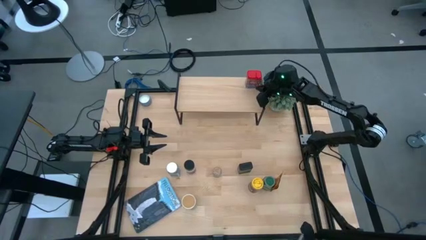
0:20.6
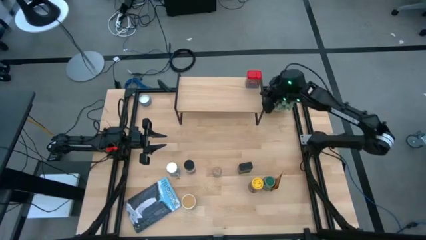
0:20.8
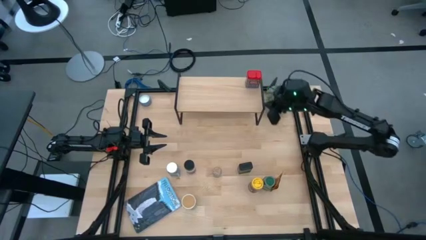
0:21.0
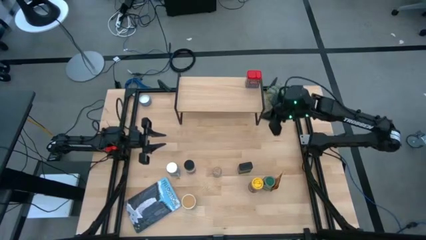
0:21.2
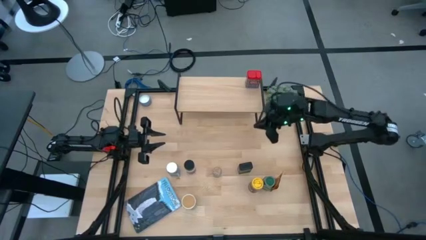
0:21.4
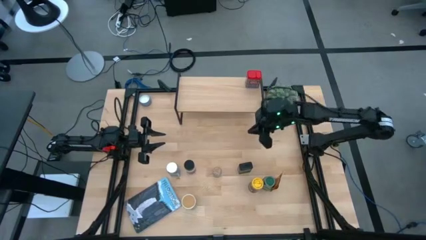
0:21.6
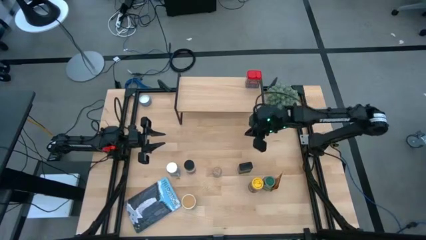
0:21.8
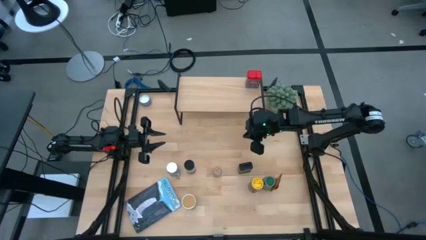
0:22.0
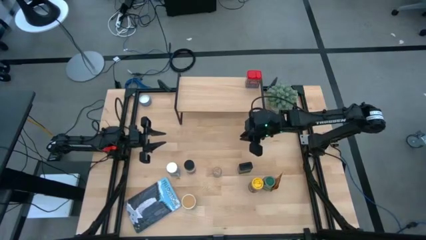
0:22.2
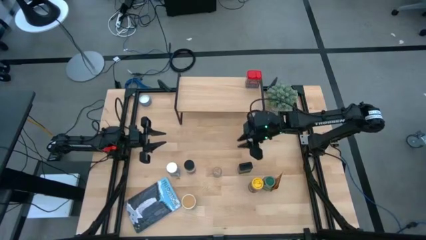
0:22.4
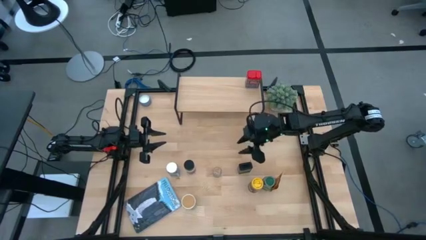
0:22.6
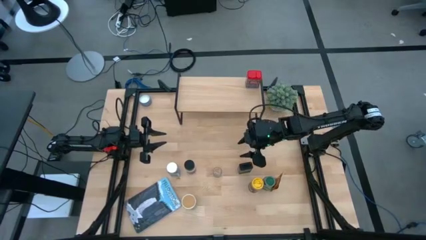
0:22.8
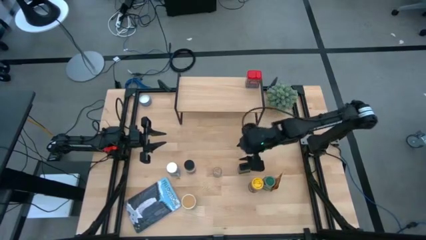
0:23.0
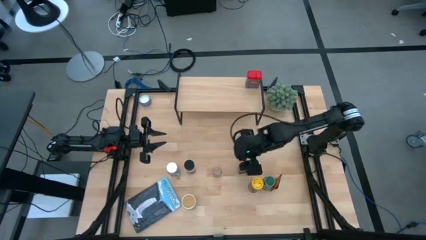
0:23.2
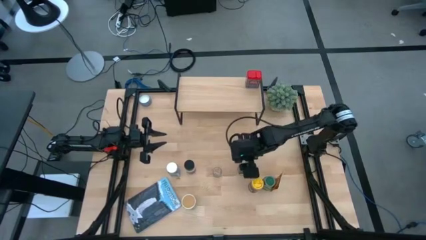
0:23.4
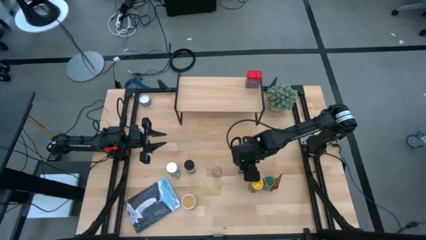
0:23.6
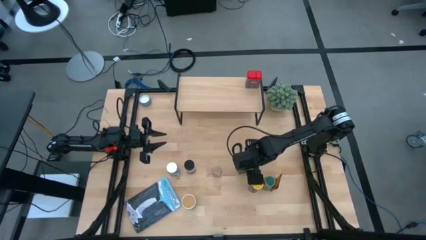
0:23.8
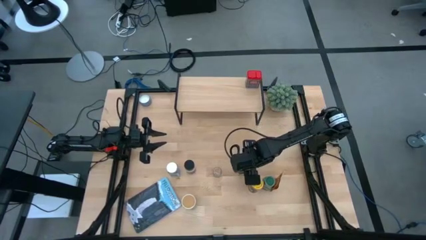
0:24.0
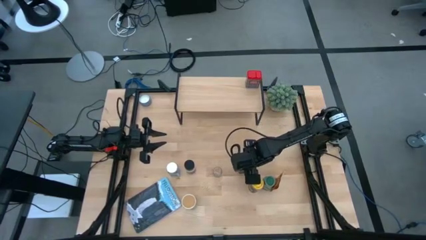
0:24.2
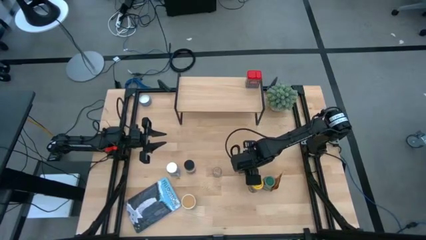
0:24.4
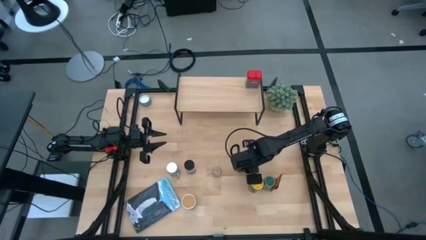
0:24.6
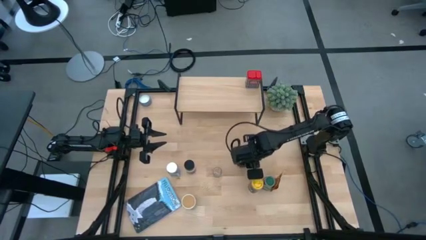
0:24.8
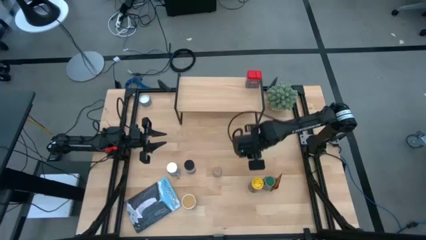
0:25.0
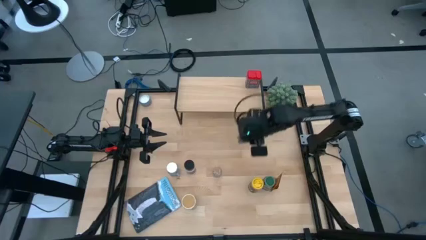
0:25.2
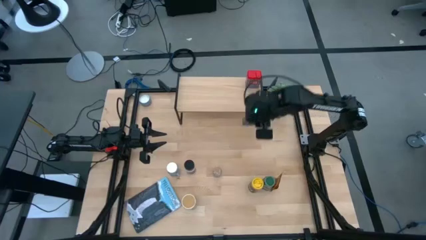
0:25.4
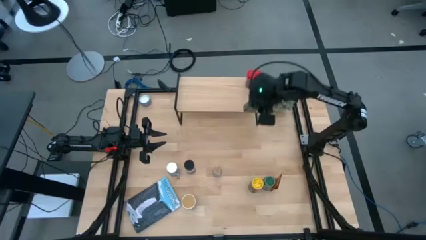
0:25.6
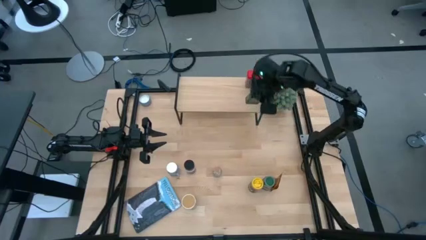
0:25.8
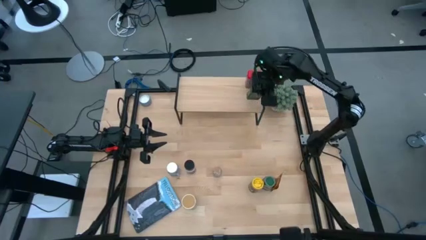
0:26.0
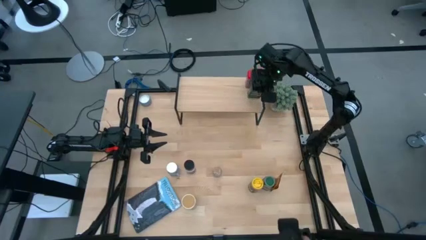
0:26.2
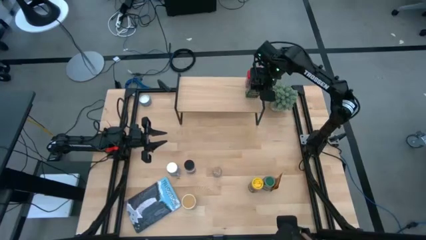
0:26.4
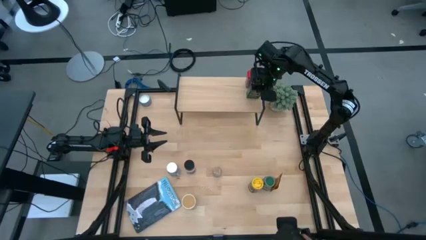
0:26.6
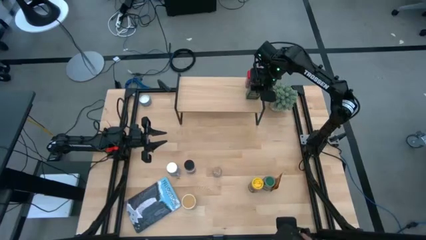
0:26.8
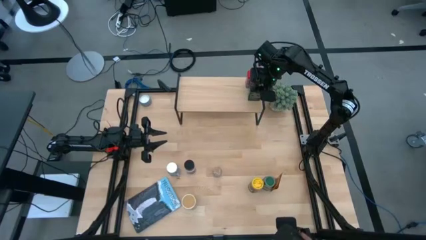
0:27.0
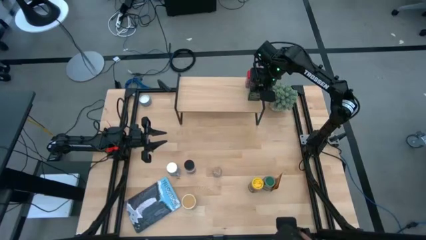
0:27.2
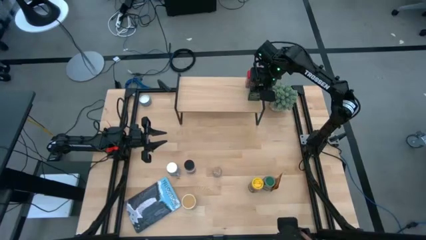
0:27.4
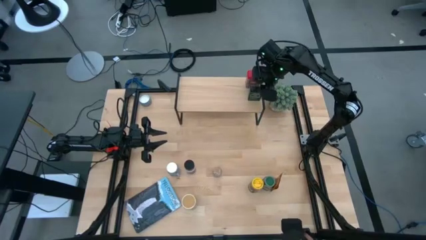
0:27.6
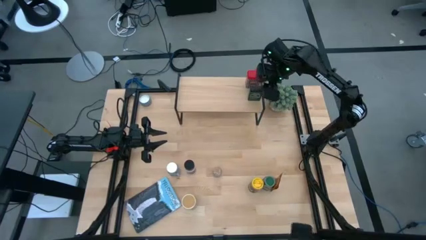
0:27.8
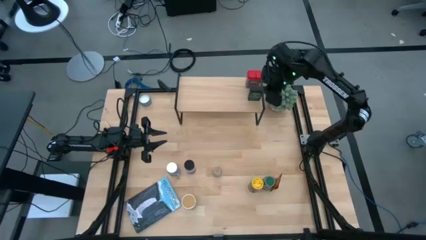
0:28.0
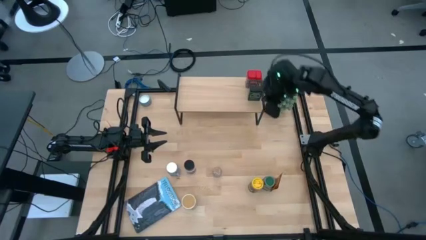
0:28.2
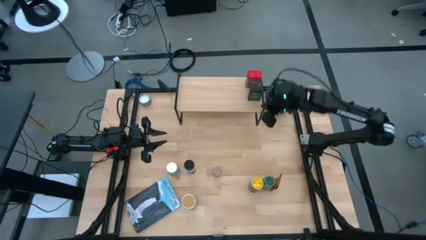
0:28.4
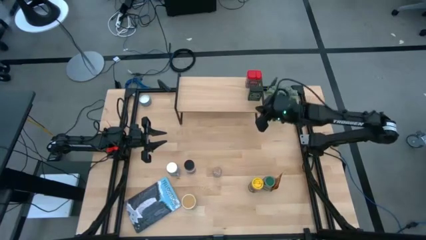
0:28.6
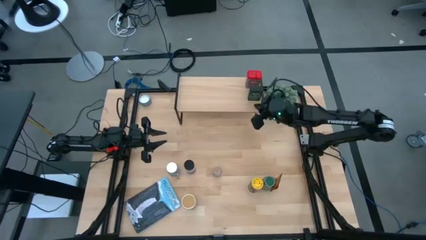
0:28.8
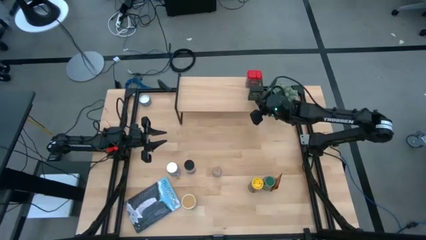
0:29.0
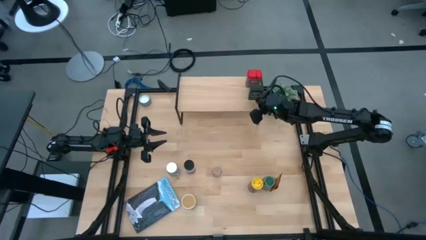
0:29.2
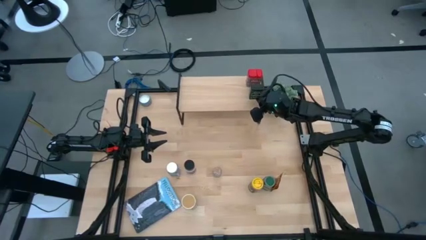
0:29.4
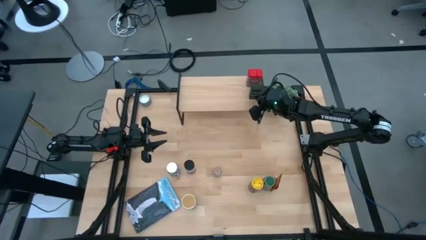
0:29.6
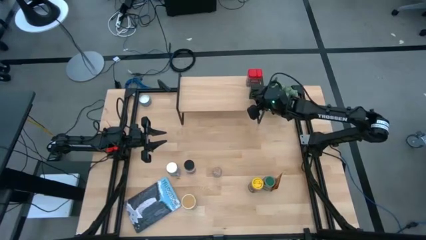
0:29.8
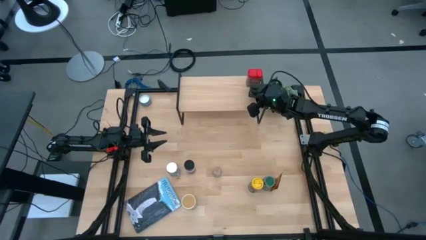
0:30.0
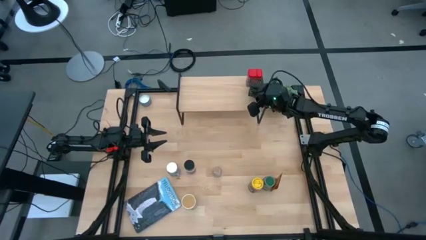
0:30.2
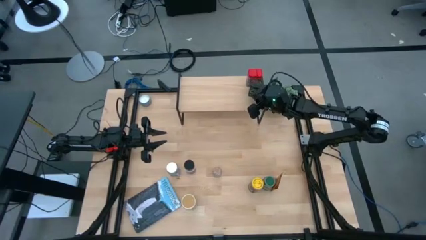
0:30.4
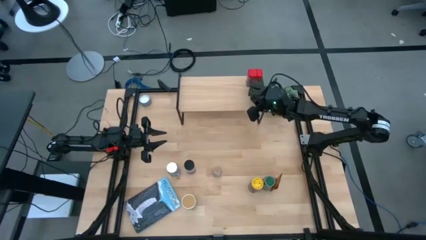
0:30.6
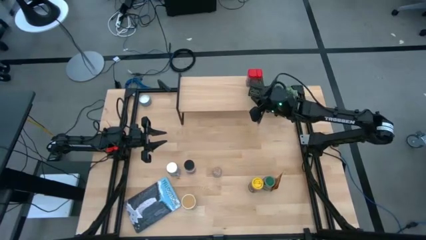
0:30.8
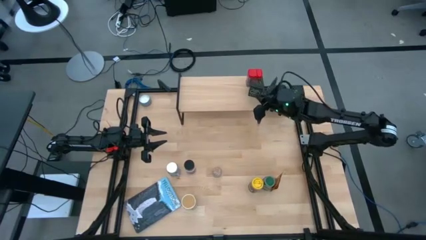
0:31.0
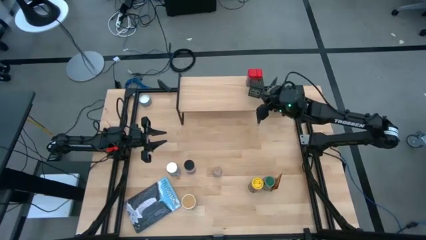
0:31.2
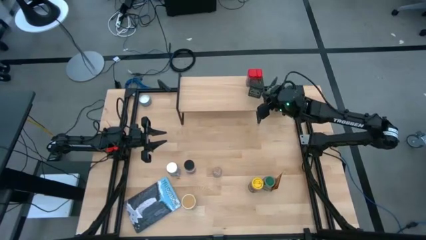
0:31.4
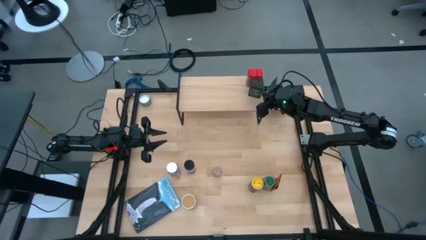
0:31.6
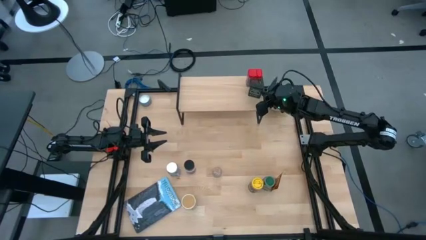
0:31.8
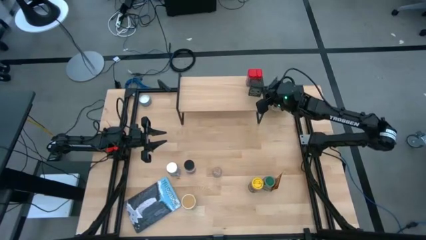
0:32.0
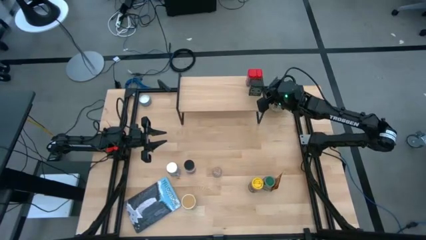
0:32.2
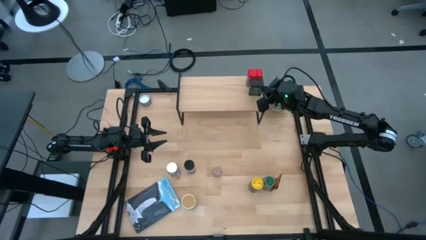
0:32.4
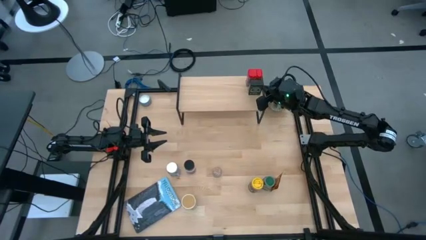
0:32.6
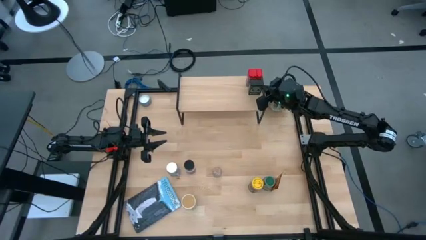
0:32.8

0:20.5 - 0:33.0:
Task: Shelf spices
Put the green seasoning can on the shelf

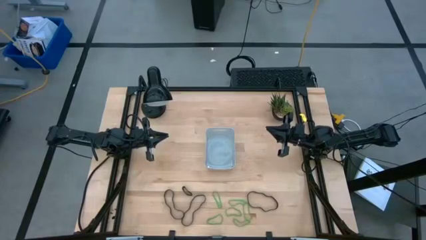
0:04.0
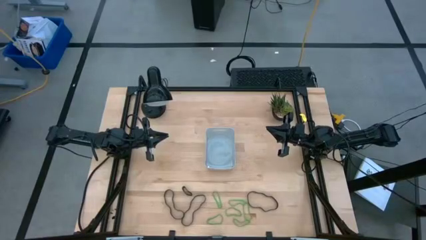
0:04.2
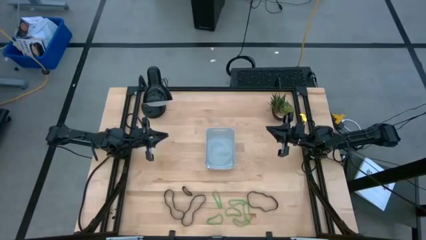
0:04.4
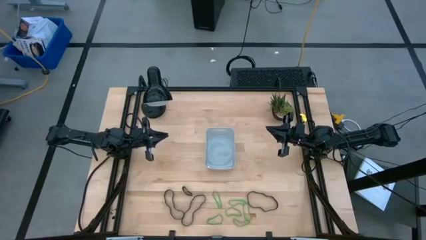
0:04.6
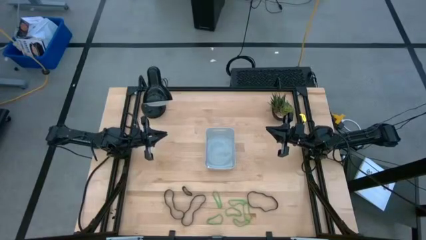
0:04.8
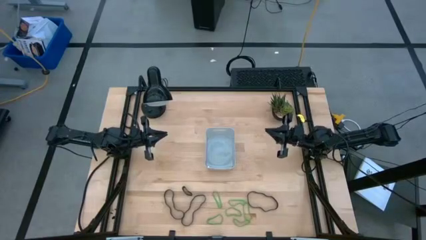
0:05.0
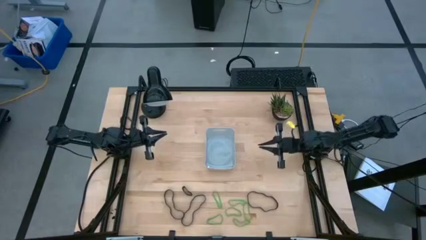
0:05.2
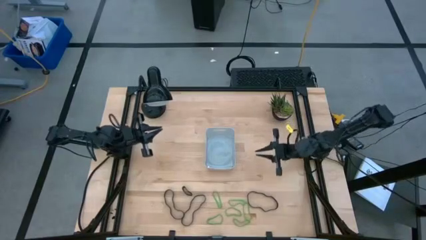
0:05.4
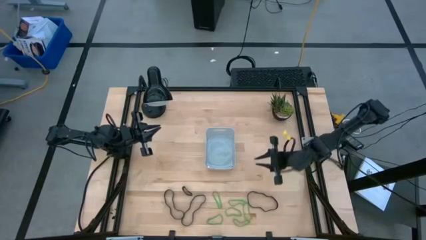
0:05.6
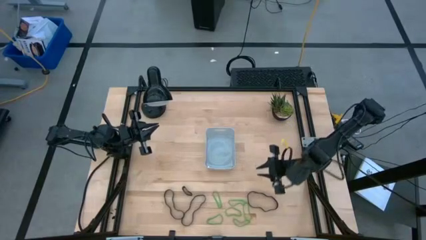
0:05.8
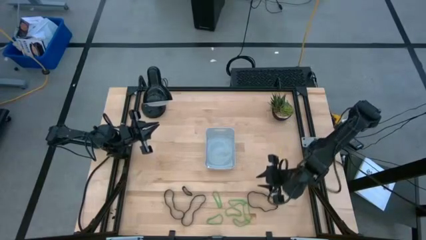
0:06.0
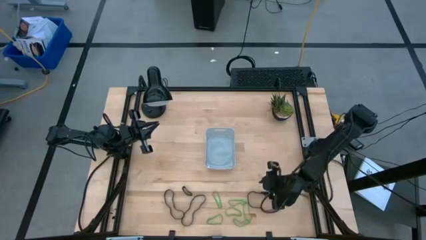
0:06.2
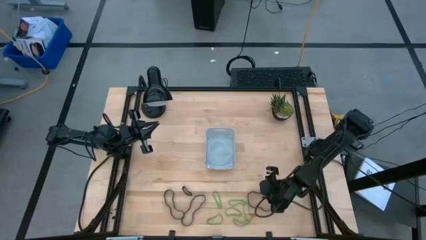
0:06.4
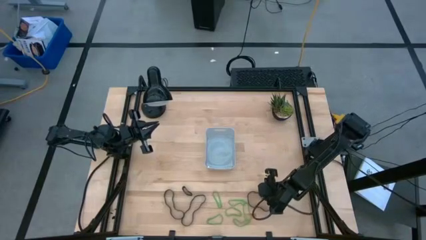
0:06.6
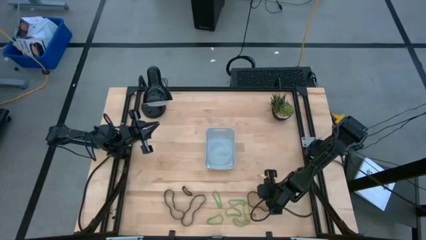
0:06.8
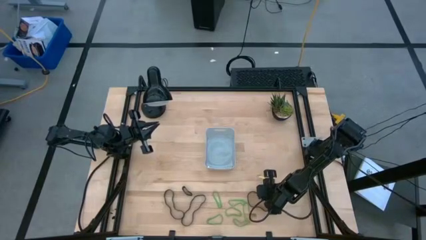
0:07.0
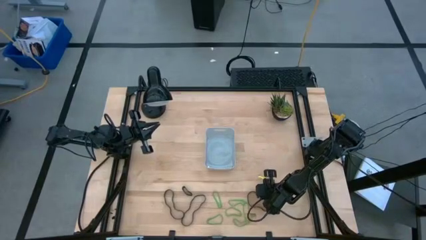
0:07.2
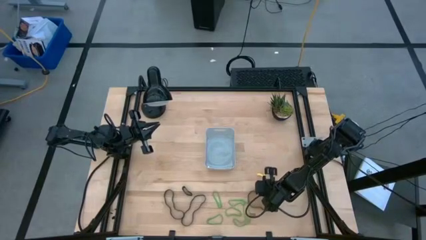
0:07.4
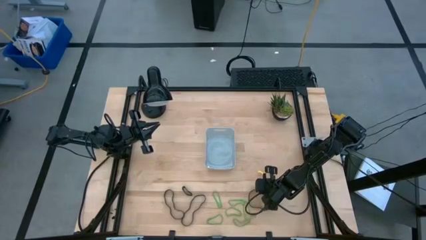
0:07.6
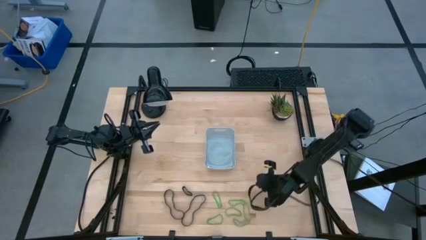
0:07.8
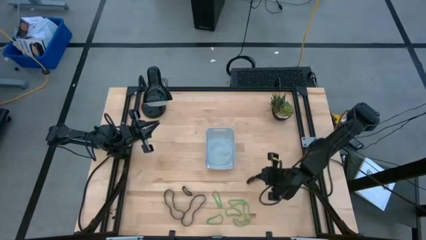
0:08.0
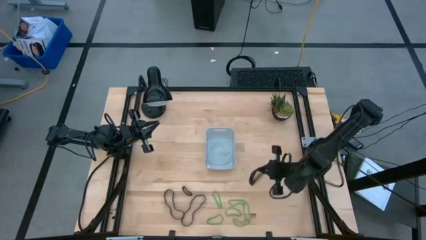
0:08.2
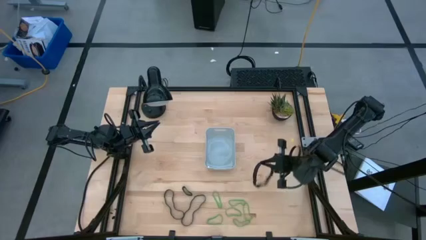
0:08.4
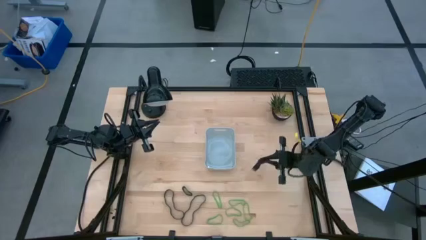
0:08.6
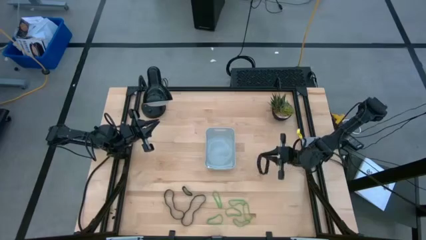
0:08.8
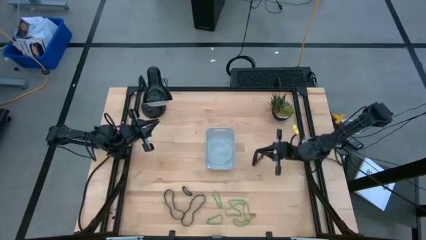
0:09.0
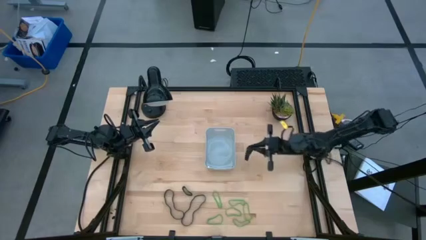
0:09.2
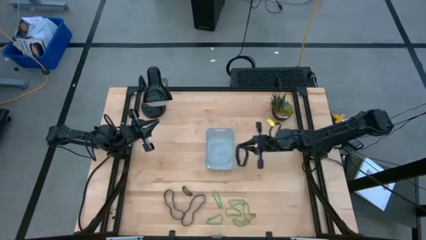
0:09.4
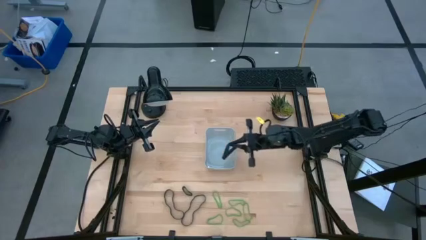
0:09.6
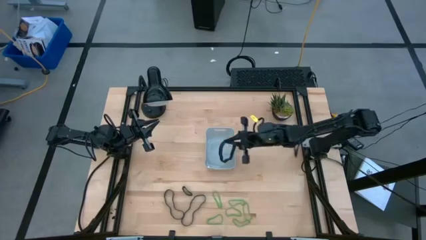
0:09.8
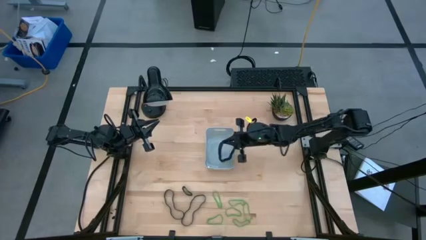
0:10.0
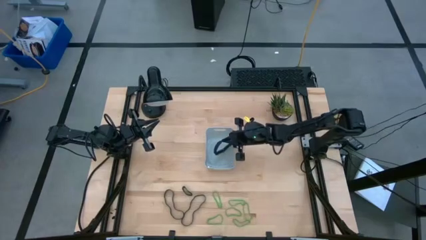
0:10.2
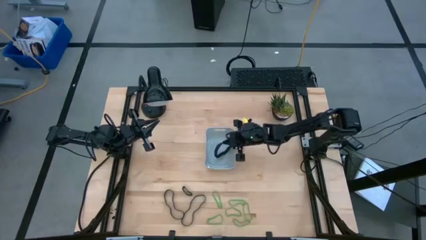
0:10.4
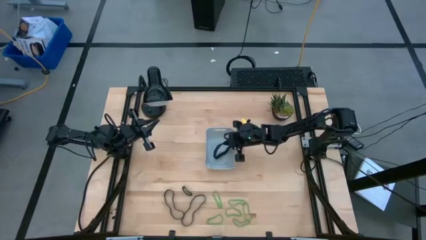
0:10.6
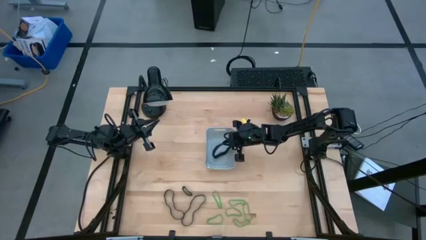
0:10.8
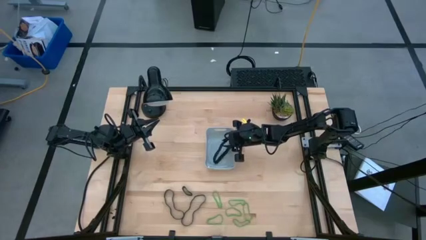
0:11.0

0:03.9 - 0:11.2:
Task: Pick and place rubber bands into bin
Put the black rubber band into the gray bin
